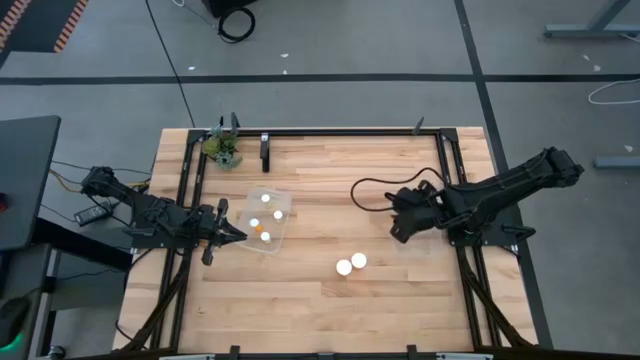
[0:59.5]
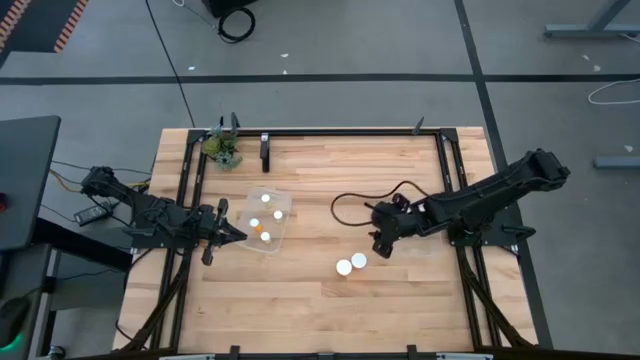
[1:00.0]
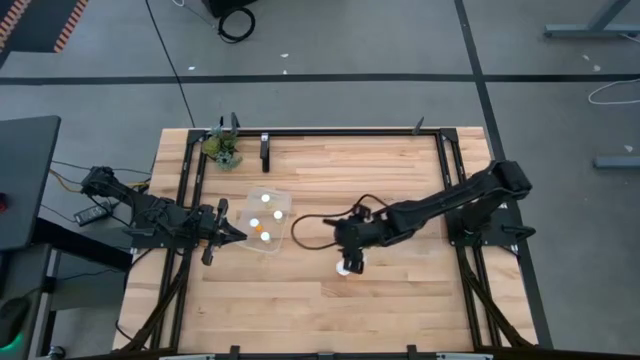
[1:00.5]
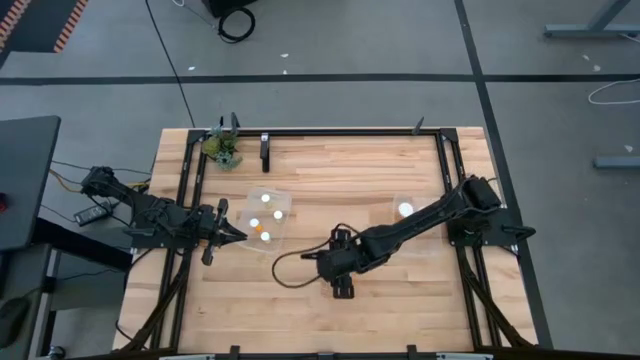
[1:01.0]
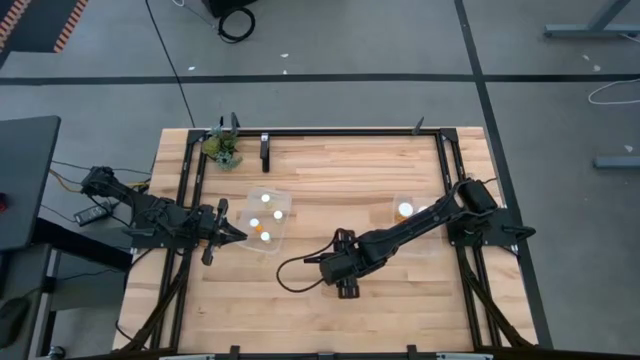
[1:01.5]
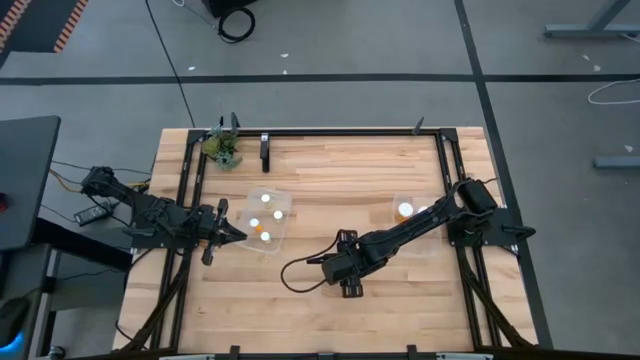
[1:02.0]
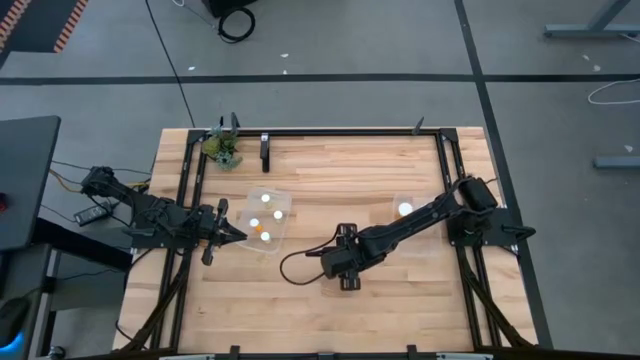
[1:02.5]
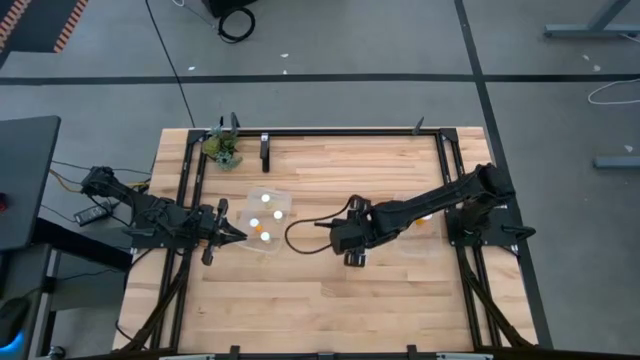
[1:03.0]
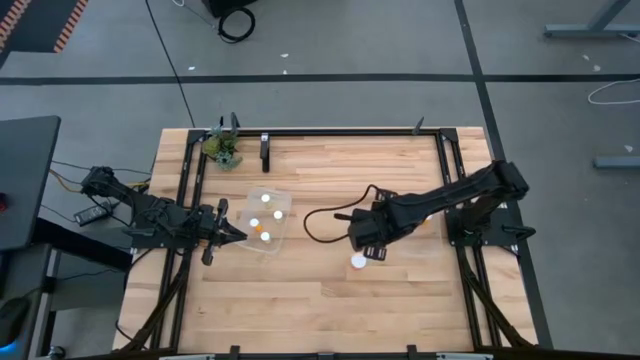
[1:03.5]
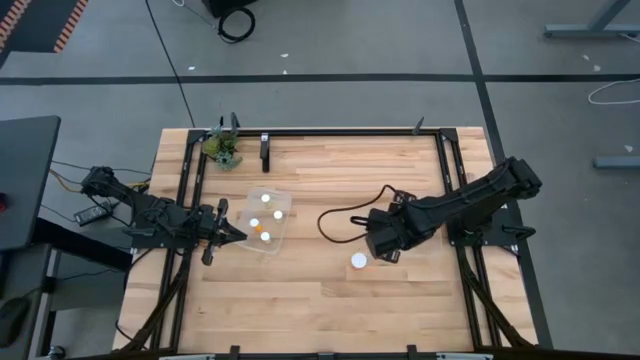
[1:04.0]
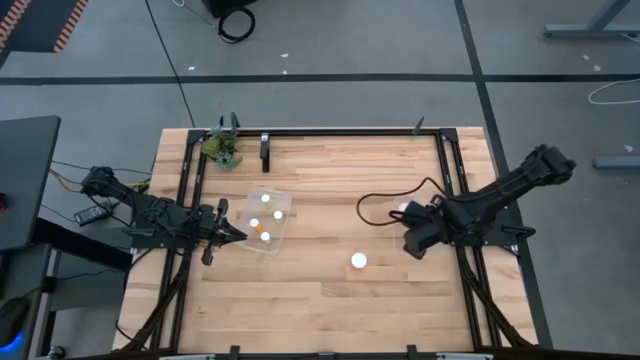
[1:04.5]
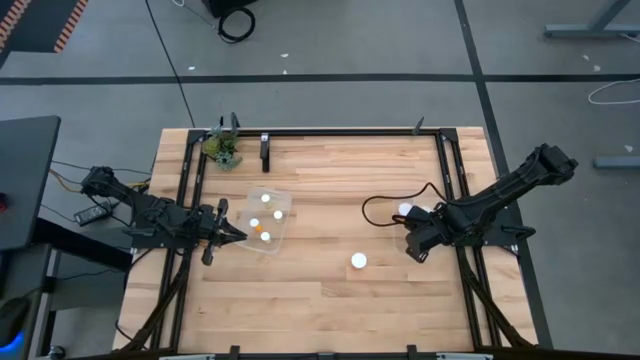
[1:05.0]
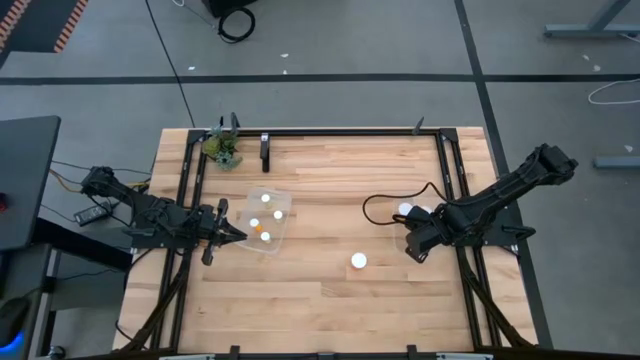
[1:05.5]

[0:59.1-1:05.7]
Task: Pick and place medicine bottles into bin by pill shape (circle, oval)
Put the orange capsule bottle into the right transparent bin

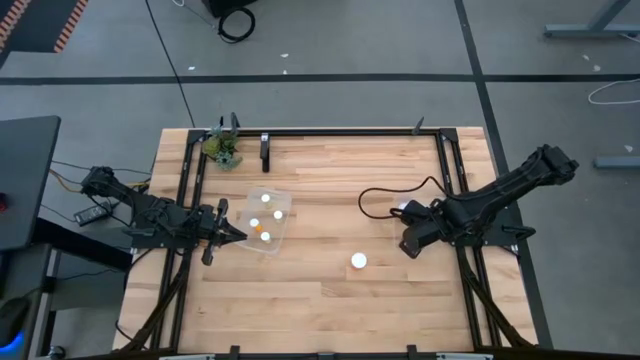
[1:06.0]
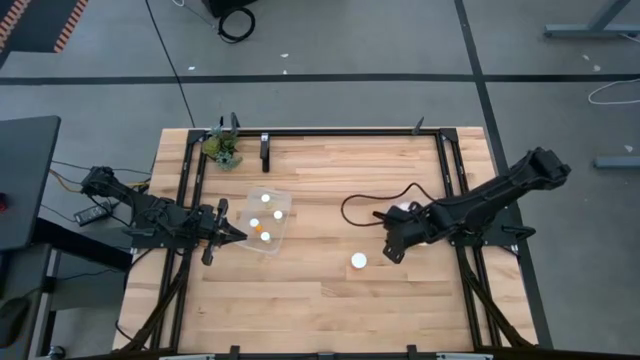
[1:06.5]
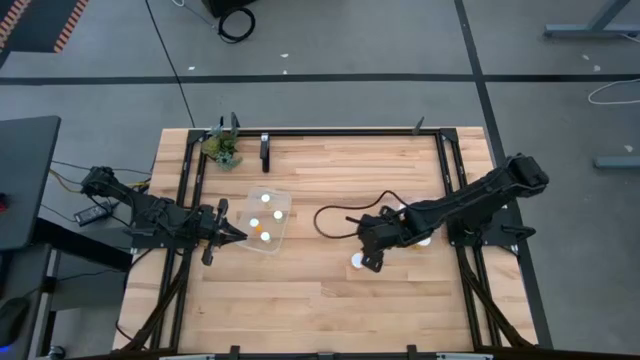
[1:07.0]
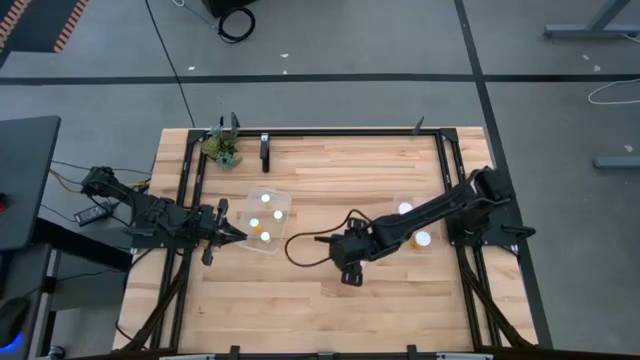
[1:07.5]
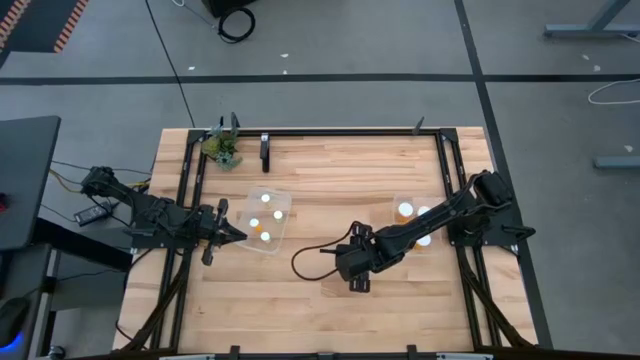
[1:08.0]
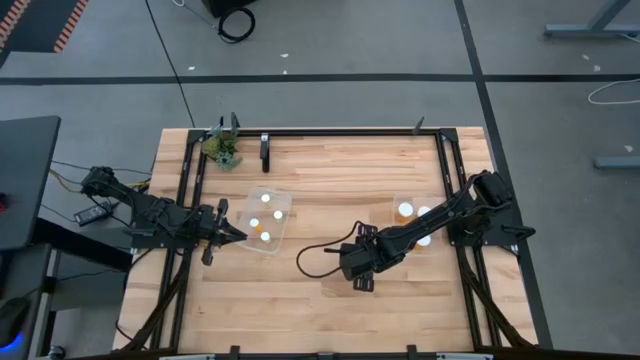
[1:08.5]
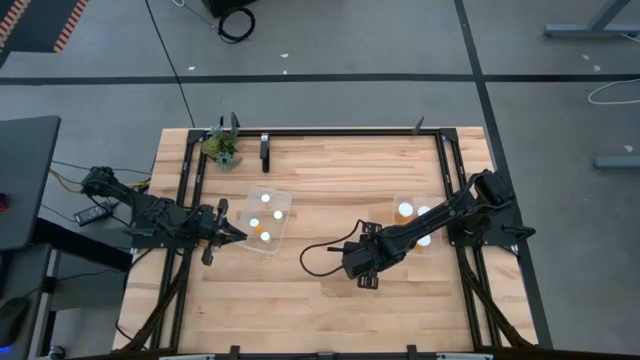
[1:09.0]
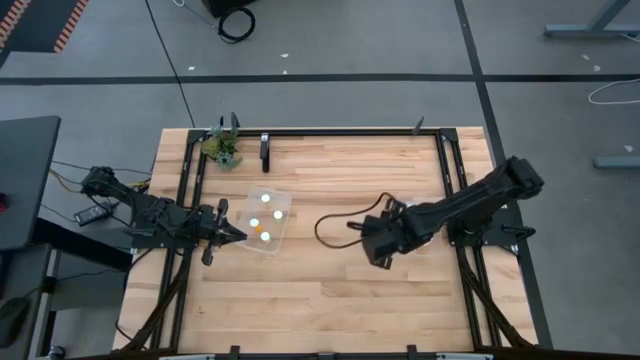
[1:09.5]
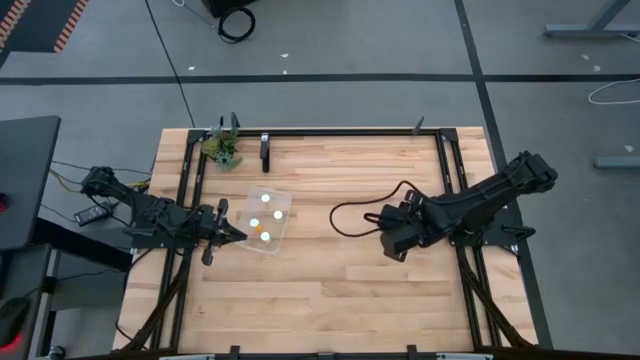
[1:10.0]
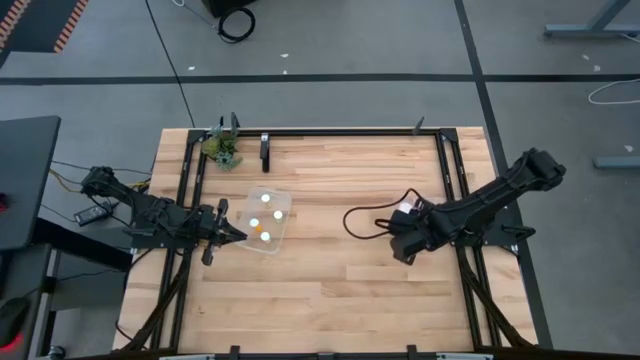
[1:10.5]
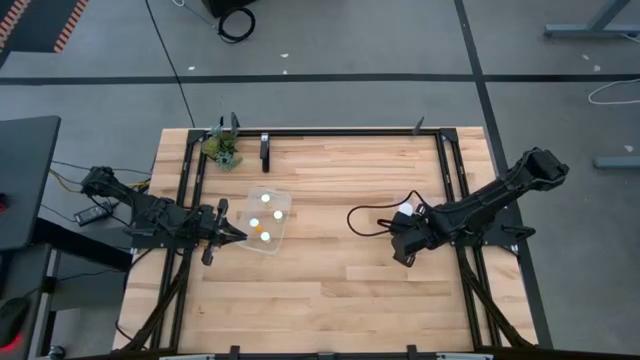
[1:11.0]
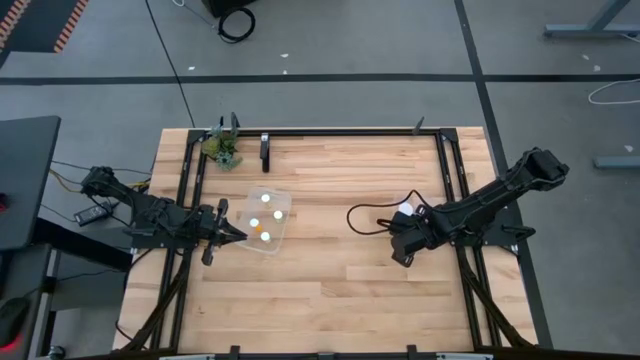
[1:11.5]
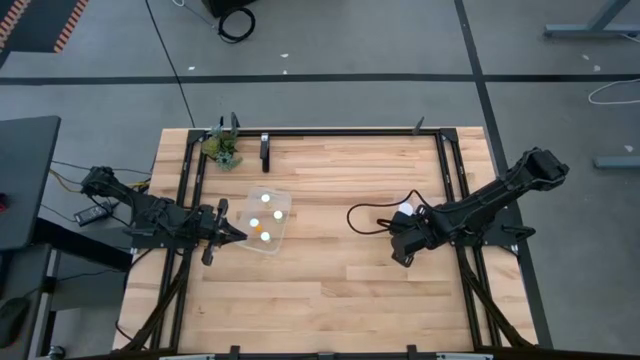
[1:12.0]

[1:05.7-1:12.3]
Put the orange capsule bottle into the right transparent bin

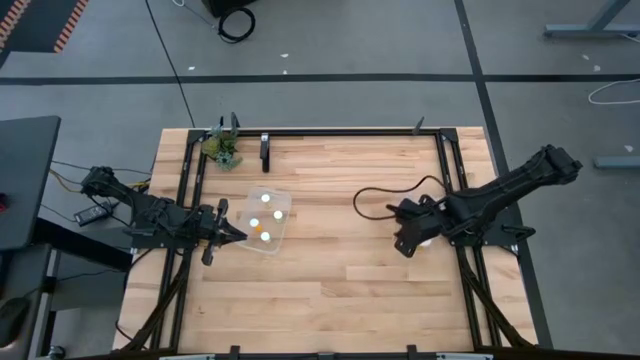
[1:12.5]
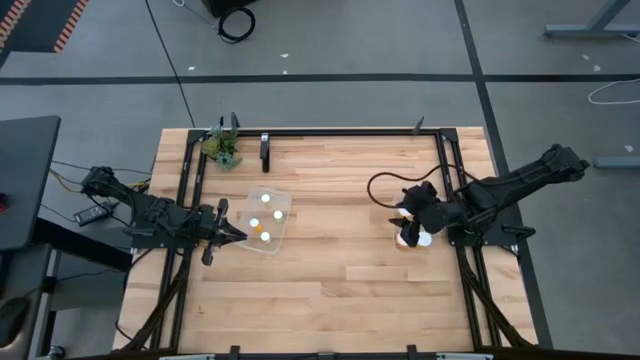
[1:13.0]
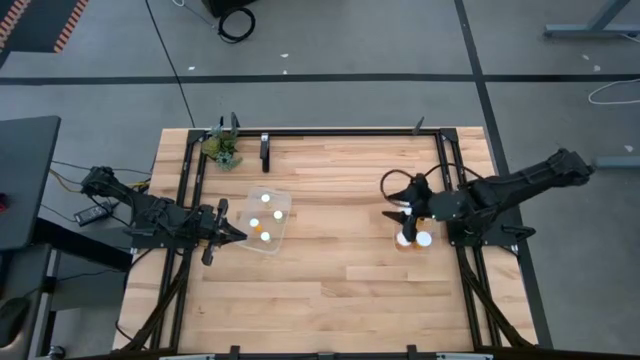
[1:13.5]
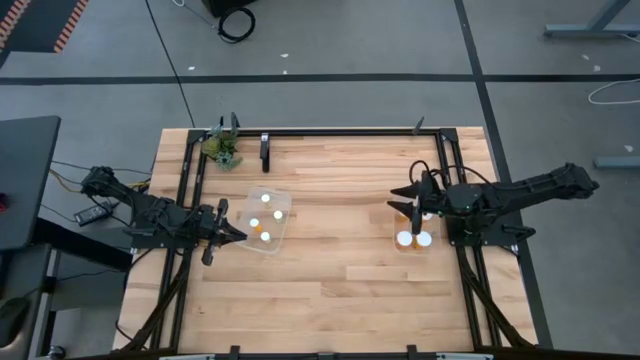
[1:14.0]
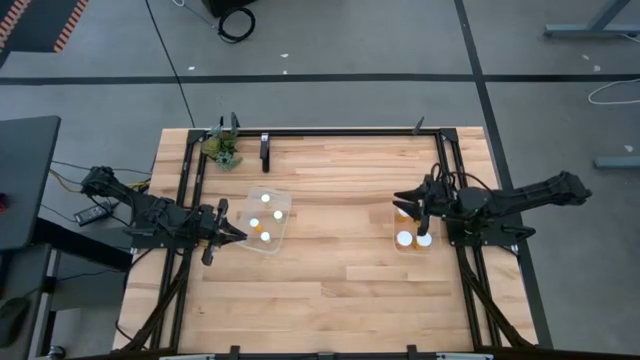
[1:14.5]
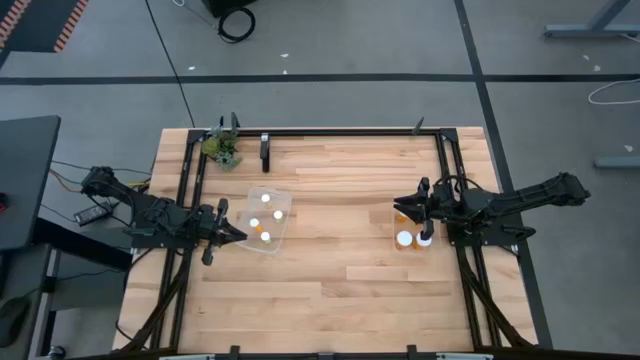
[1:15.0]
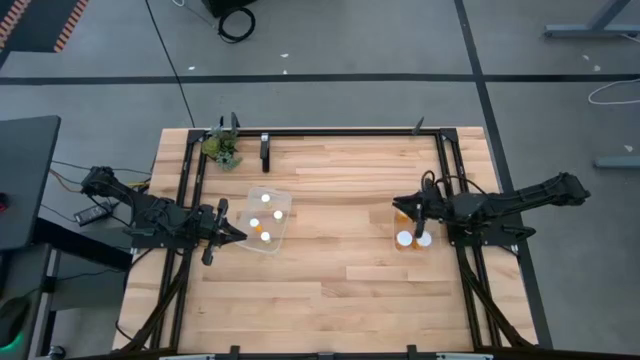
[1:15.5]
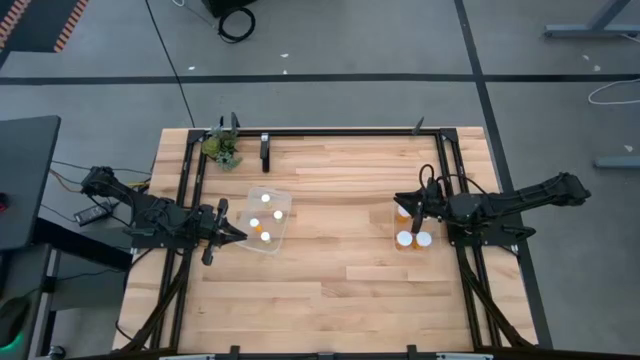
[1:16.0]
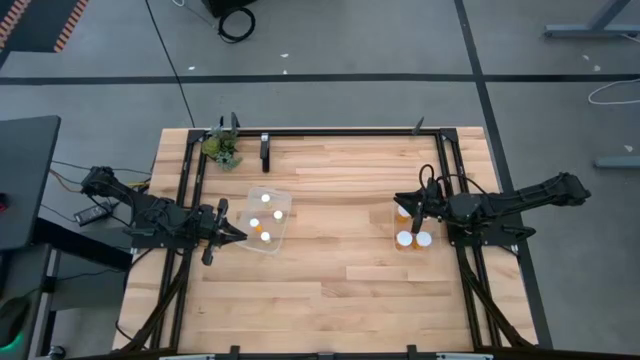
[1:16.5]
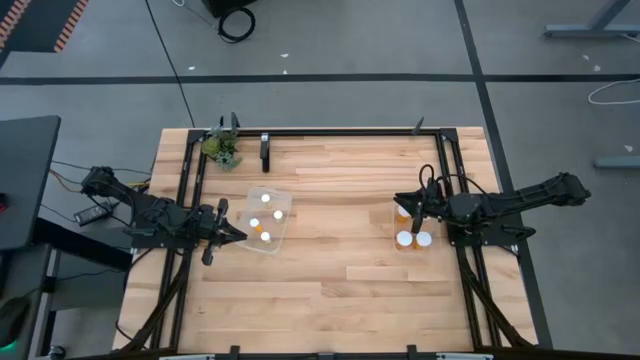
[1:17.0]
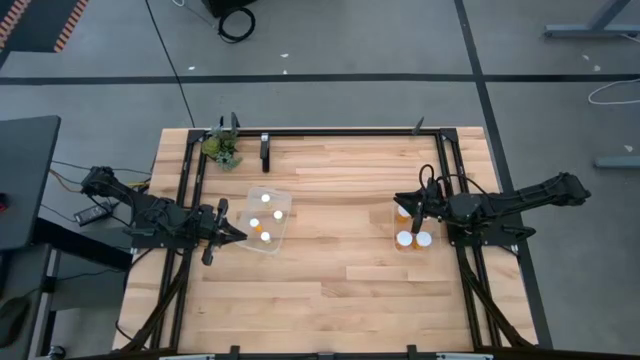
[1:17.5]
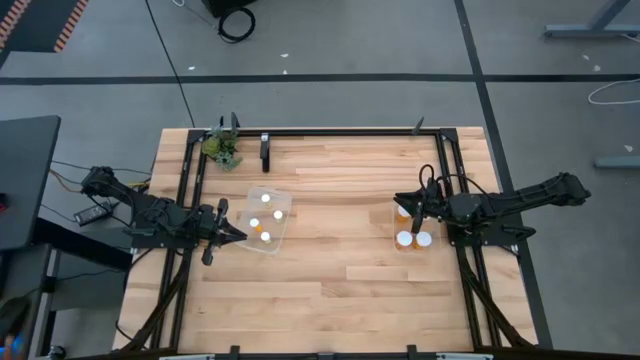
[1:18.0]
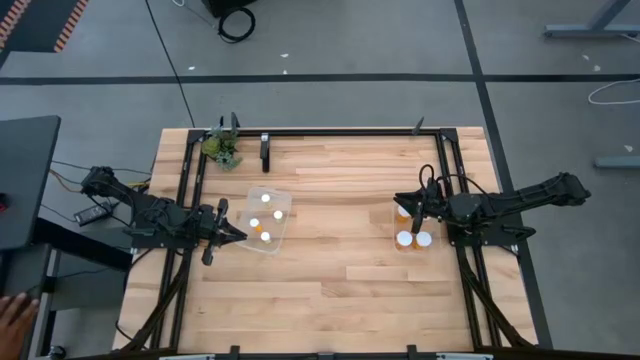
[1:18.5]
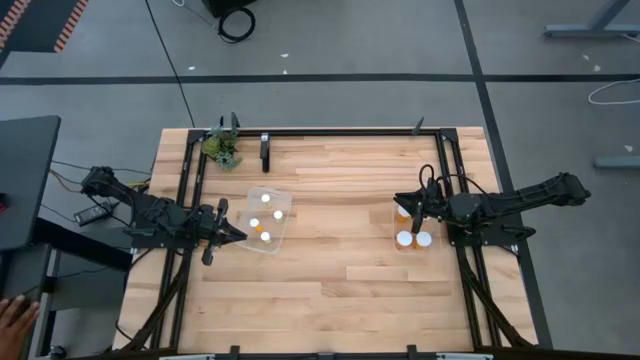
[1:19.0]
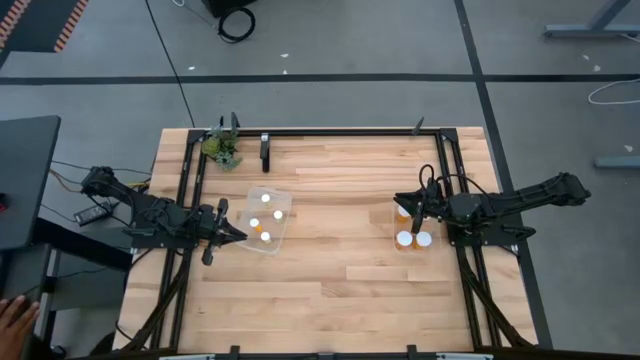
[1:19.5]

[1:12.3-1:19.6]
Return to Home Position

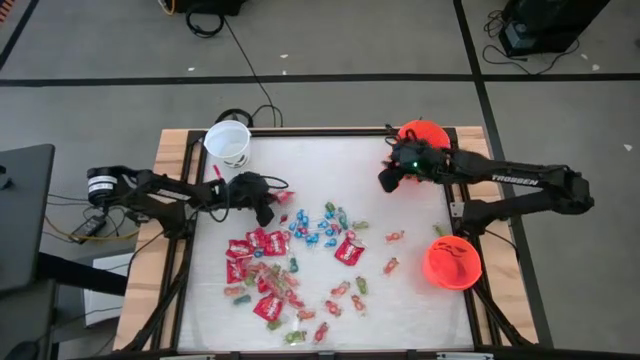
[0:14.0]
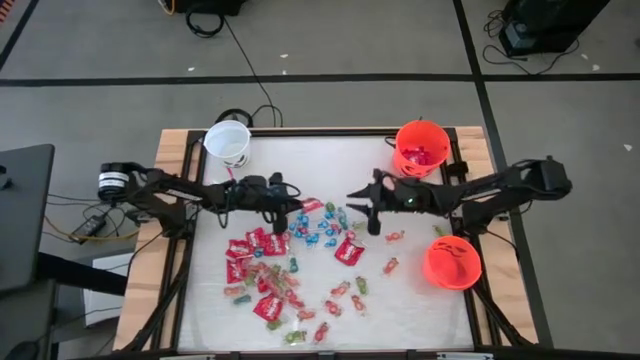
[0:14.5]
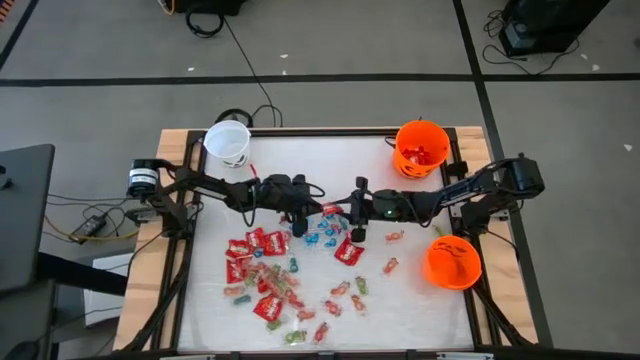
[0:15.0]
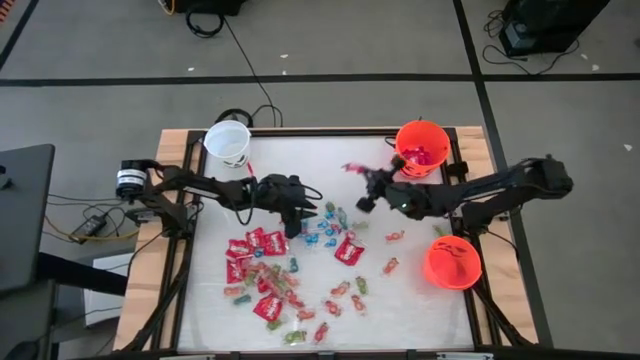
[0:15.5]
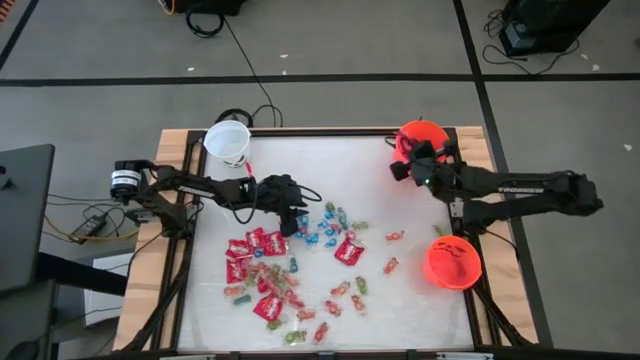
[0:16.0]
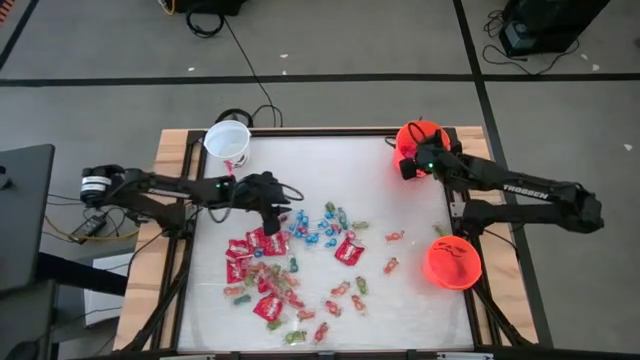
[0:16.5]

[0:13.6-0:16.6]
Task: Sort candy by brand, put in halloween buckets
Put the red candy into the top orange bucket
